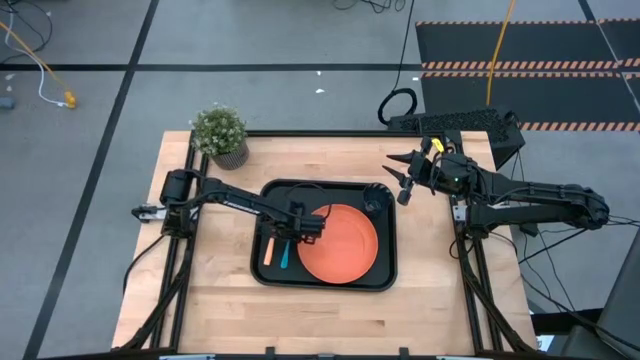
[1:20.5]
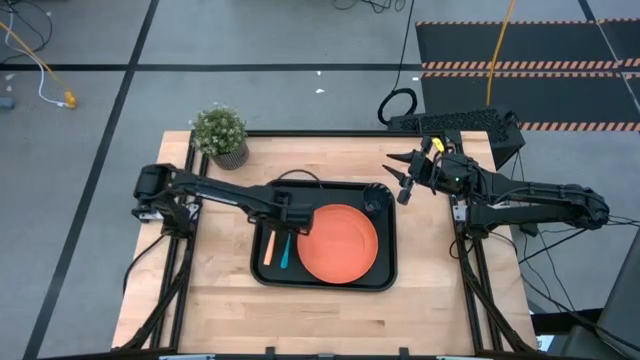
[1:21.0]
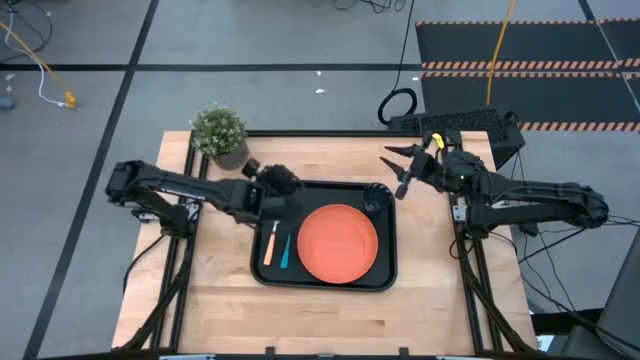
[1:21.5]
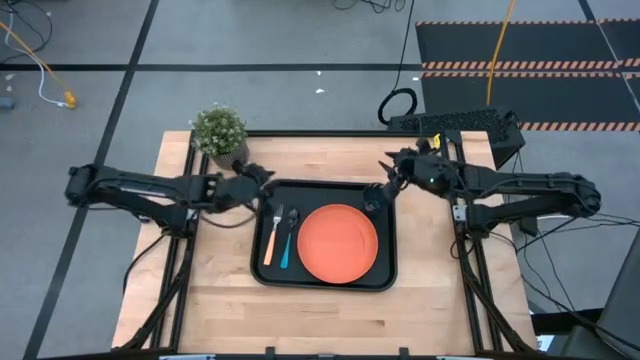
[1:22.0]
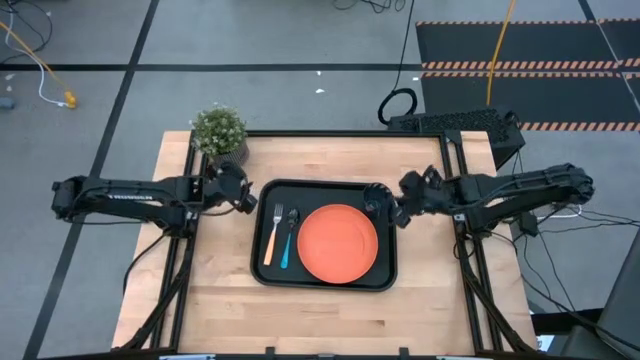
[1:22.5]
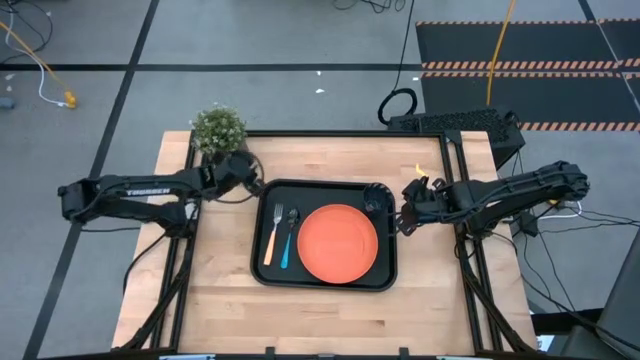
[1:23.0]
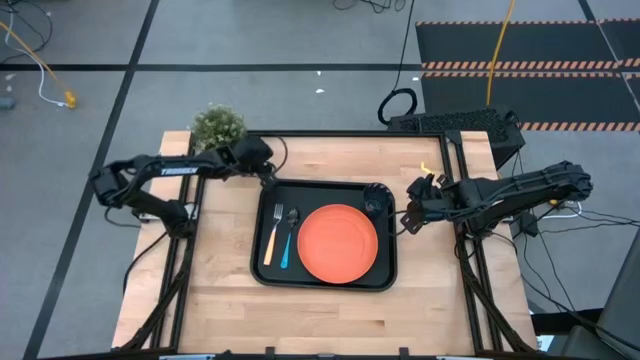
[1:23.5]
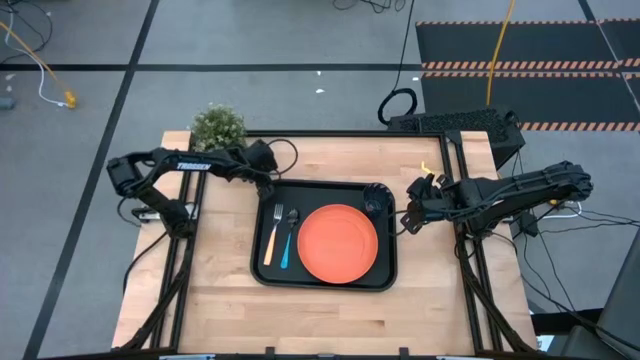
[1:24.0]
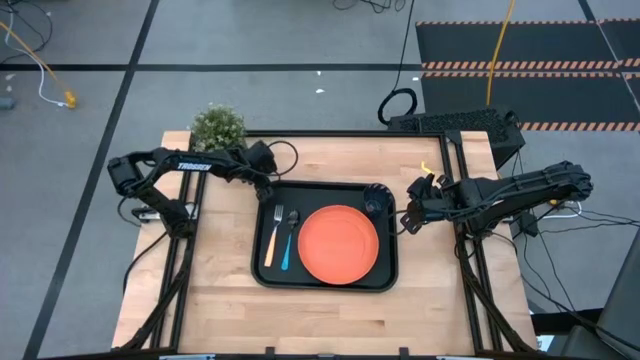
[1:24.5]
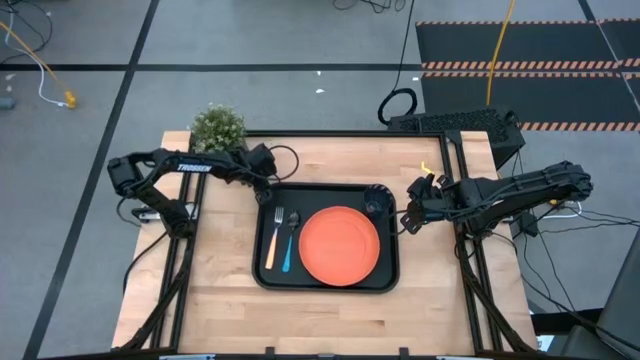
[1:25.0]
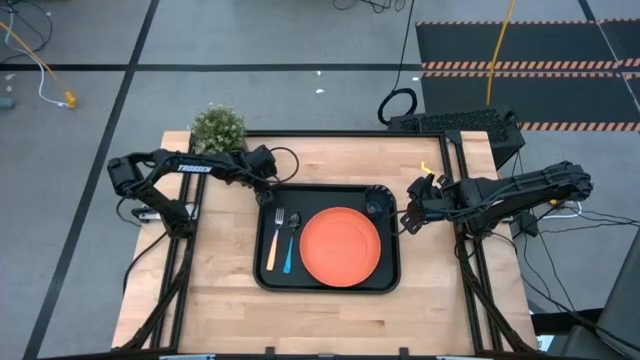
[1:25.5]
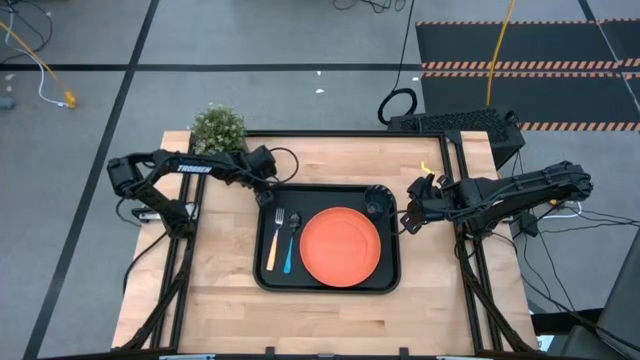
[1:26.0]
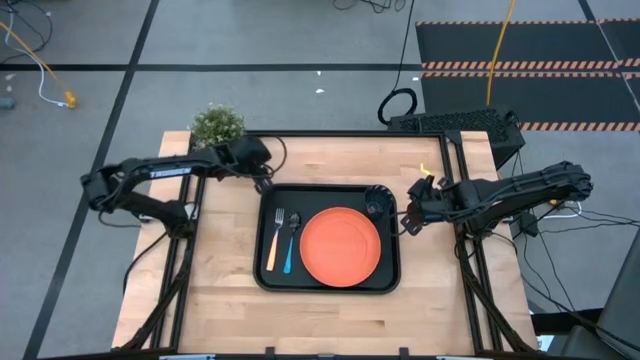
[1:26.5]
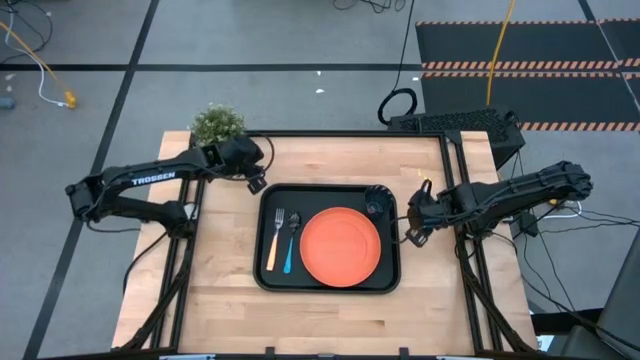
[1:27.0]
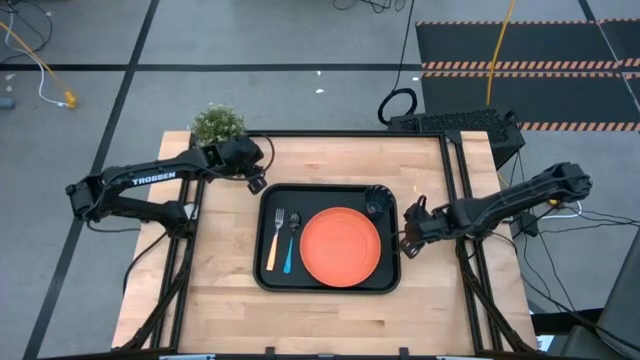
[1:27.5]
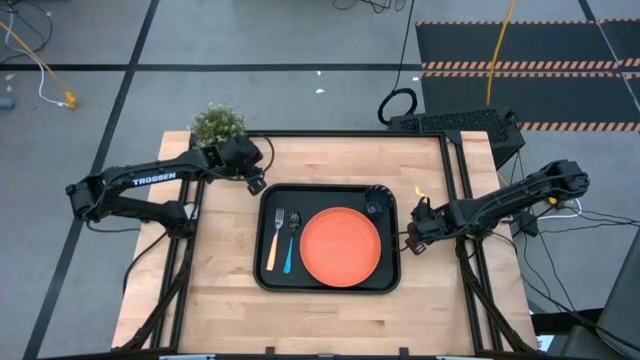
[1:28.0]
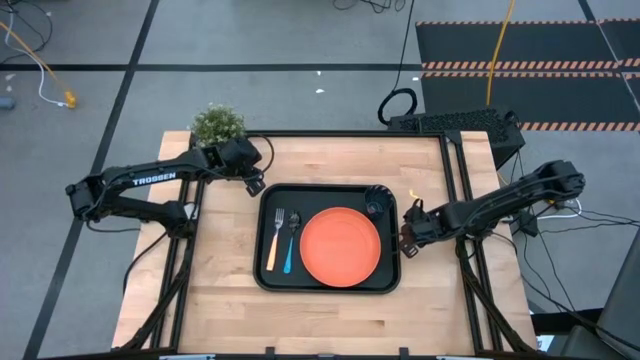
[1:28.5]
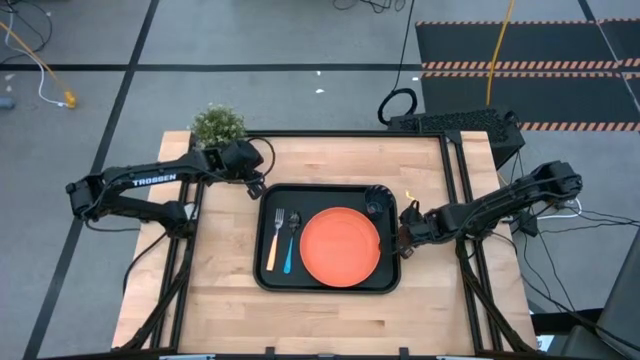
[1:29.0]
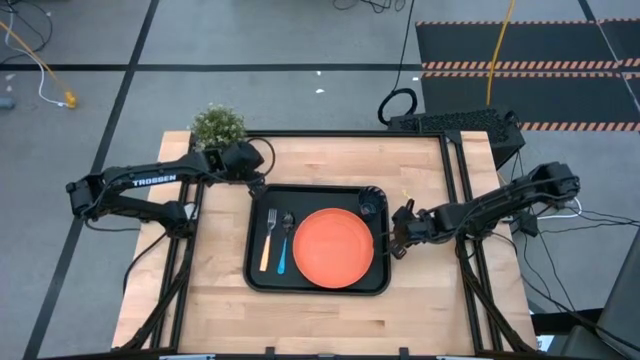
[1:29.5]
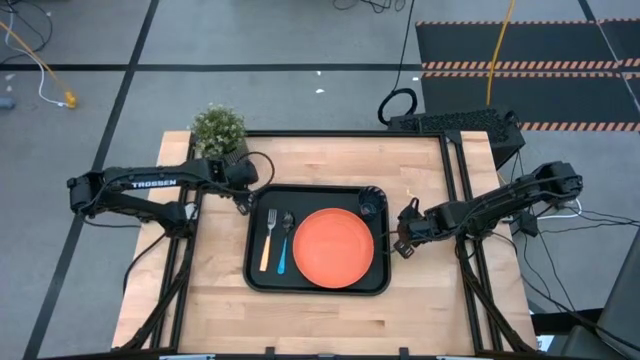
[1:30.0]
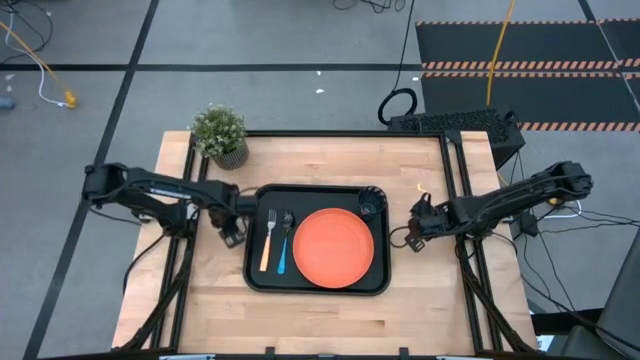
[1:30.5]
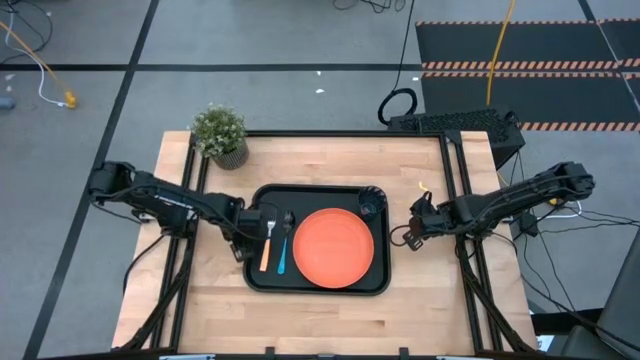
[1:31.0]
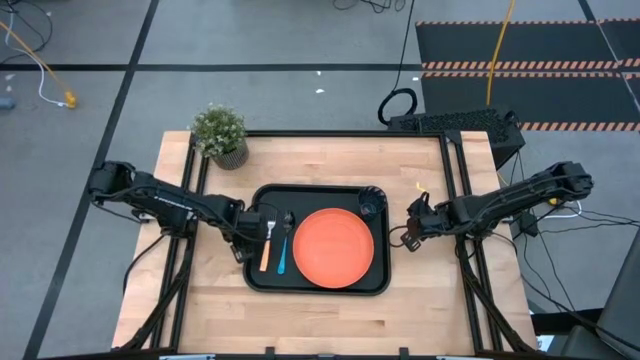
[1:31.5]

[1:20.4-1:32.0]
Task: Pick and place plate/cup/fork/spoon on tray
Adjust the black tray on the table

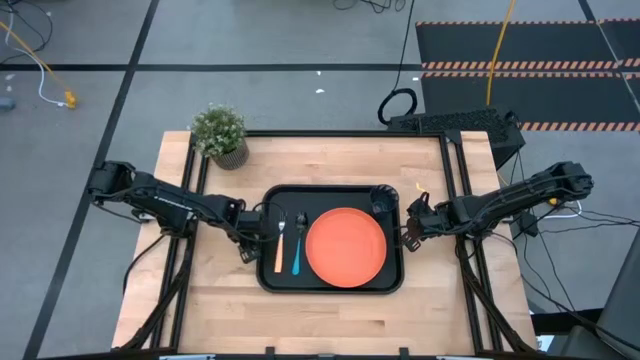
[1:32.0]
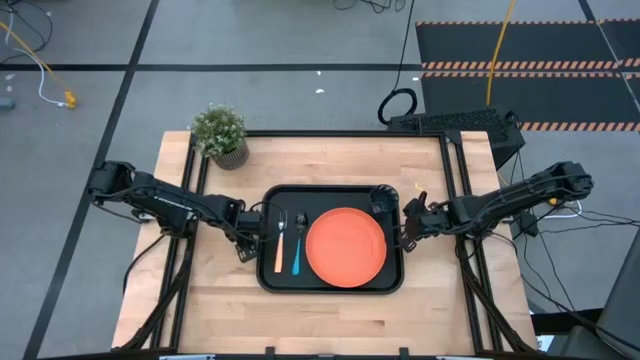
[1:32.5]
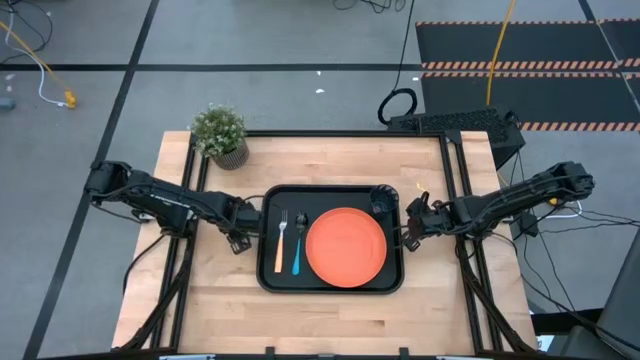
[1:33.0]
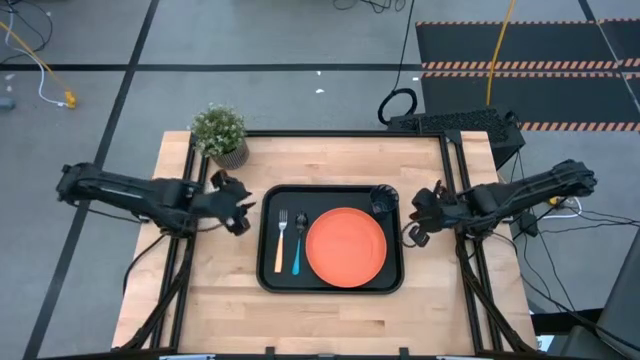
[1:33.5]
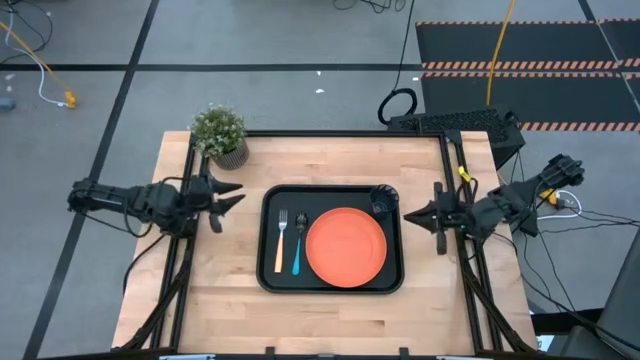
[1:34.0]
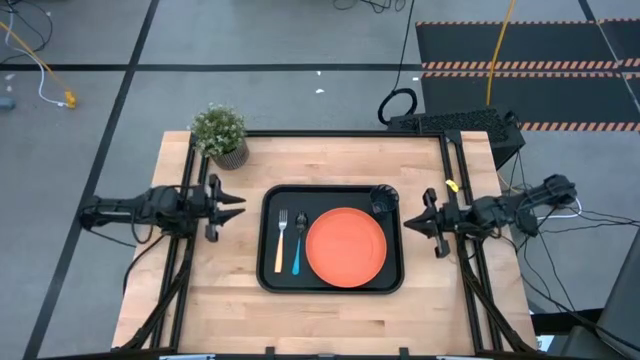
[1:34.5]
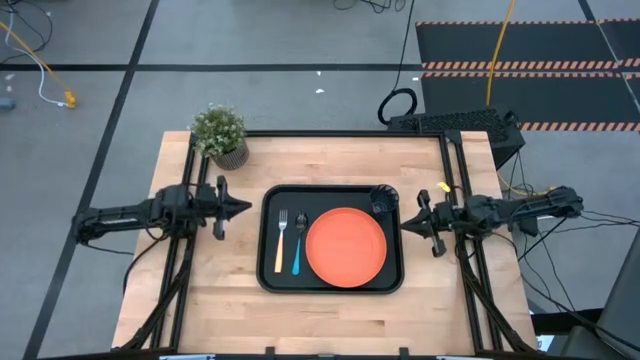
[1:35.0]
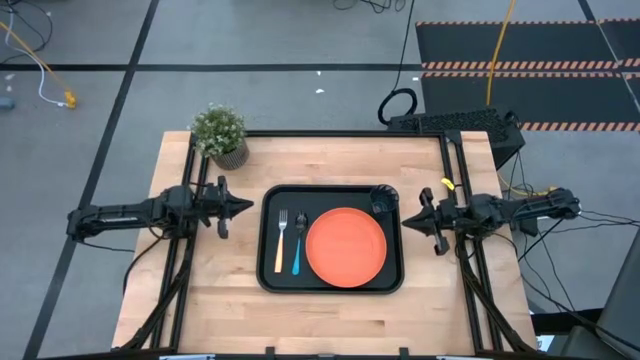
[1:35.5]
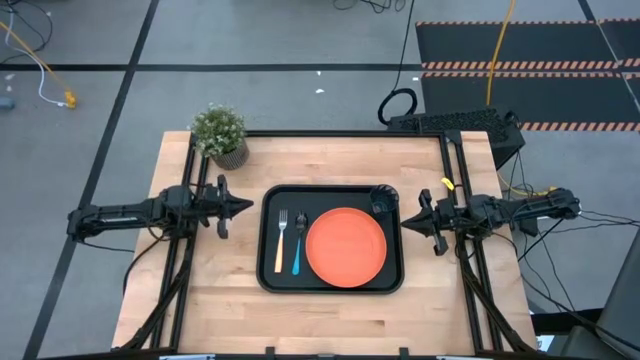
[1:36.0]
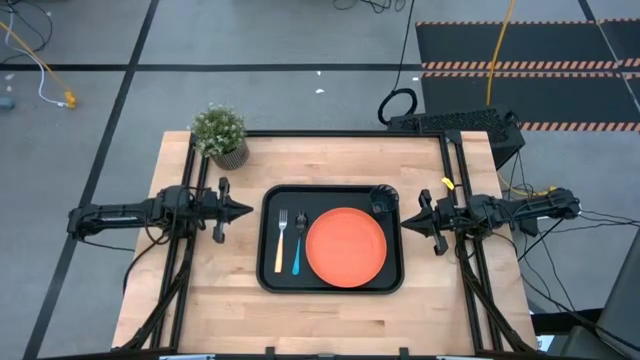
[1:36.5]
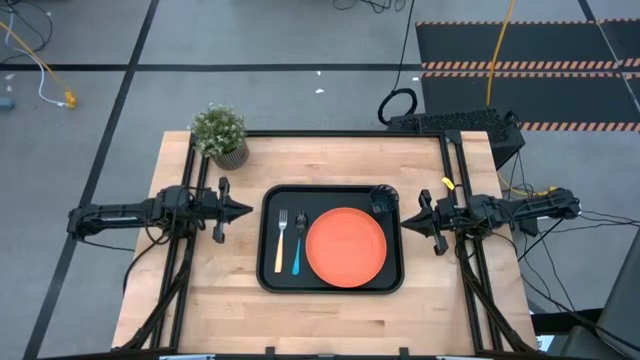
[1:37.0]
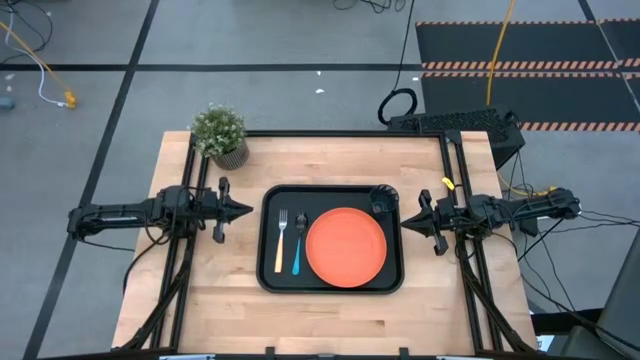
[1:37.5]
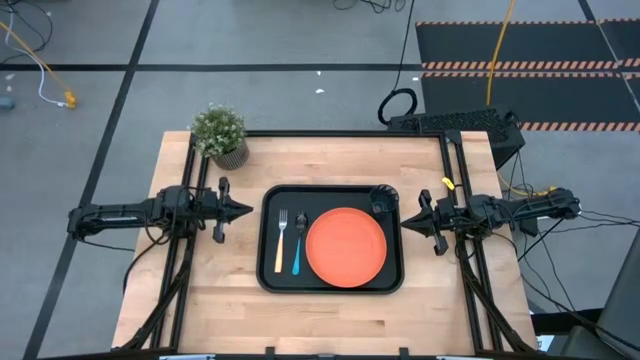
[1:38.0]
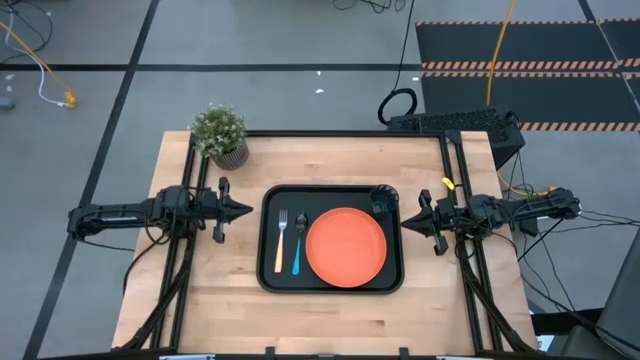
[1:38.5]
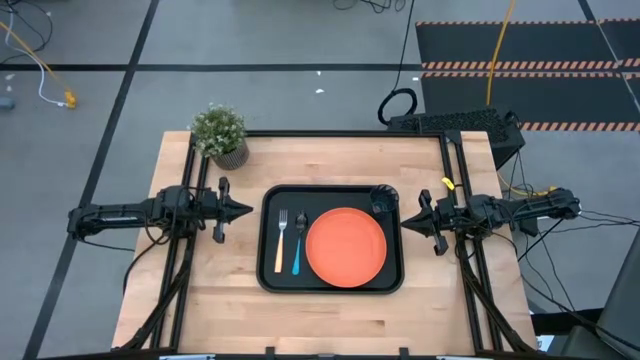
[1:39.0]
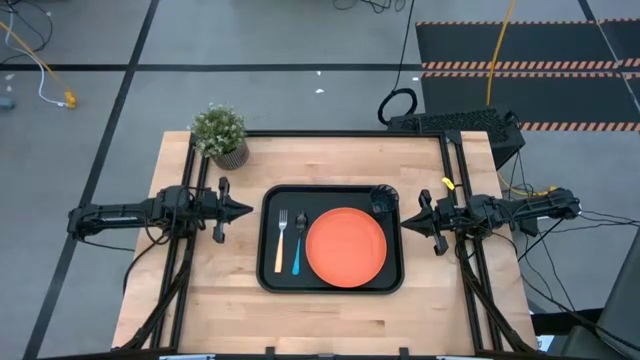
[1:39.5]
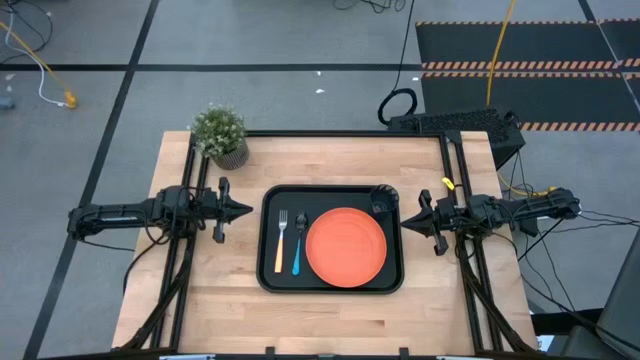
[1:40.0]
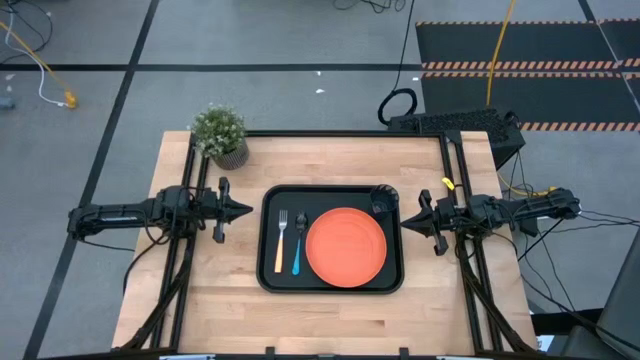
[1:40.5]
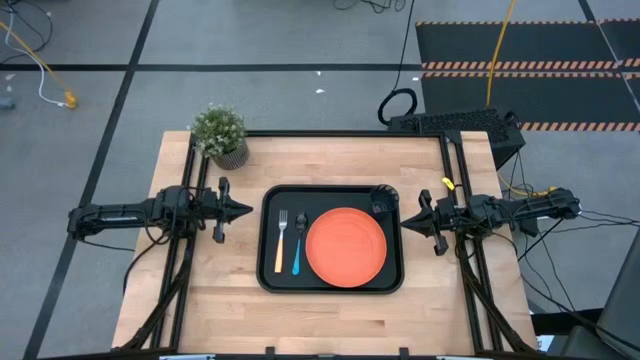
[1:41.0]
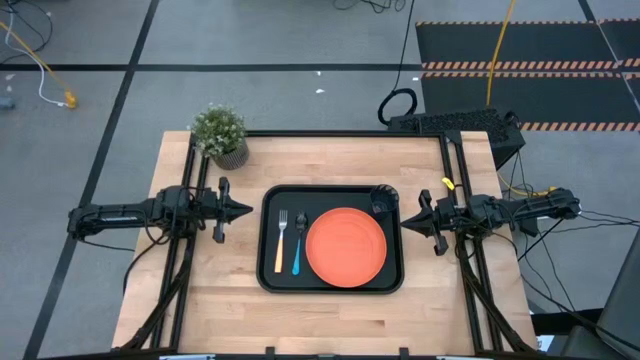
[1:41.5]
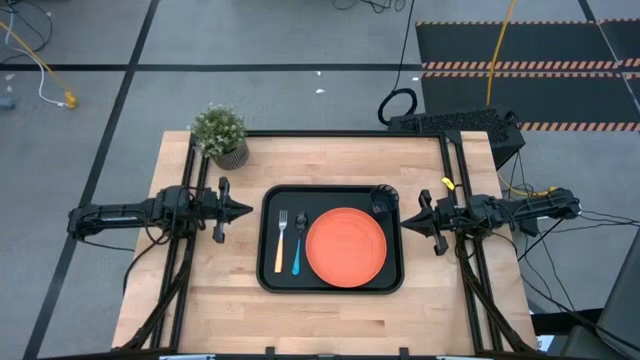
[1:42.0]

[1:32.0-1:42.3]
Return to Home Position
